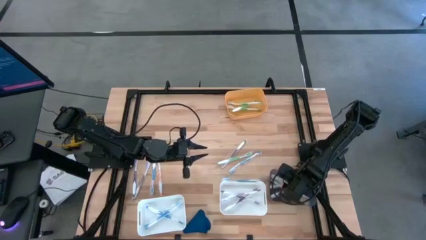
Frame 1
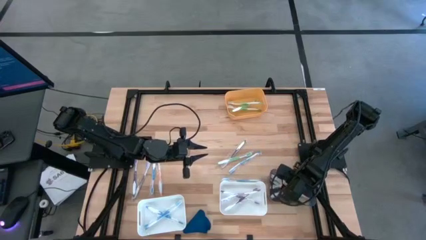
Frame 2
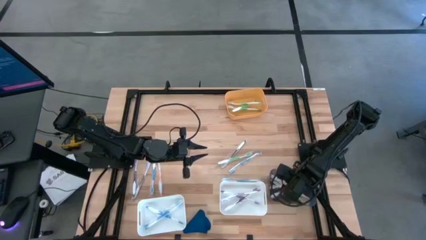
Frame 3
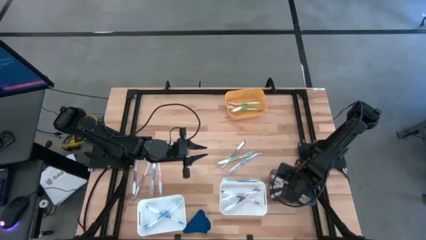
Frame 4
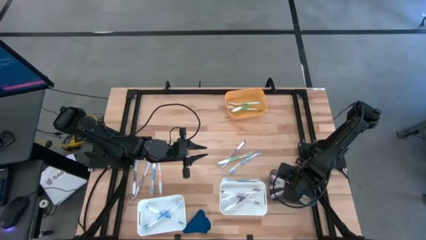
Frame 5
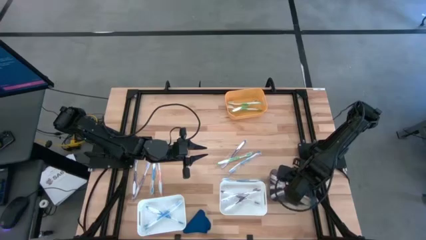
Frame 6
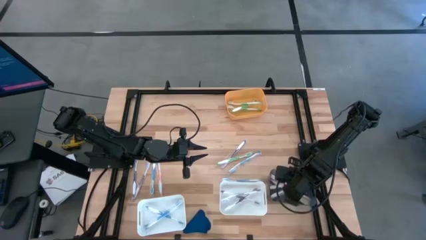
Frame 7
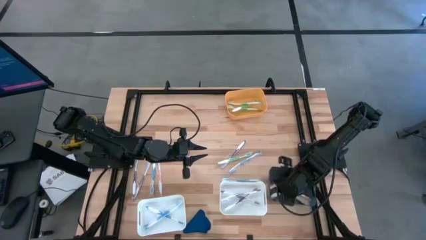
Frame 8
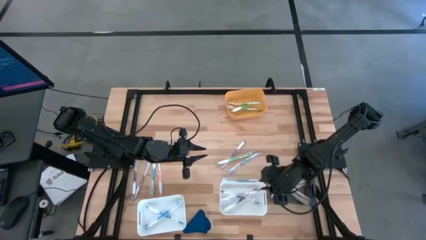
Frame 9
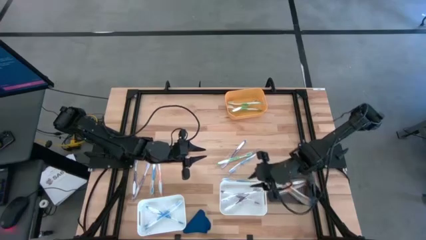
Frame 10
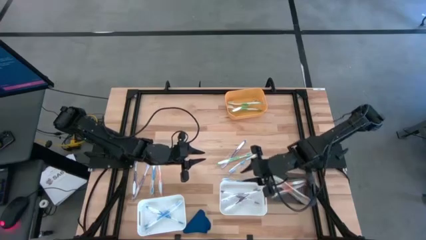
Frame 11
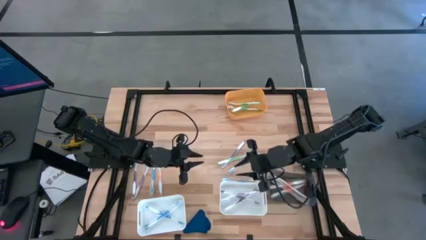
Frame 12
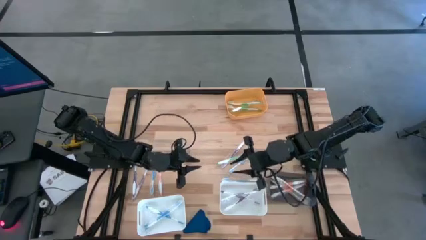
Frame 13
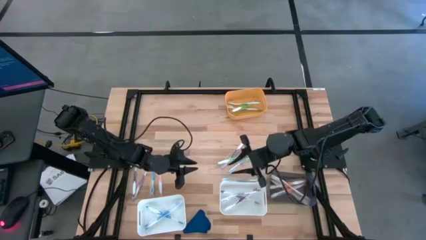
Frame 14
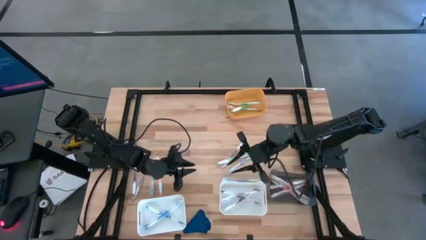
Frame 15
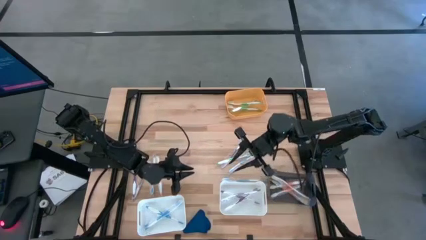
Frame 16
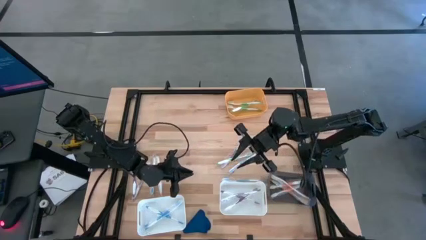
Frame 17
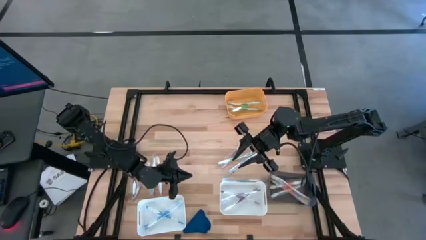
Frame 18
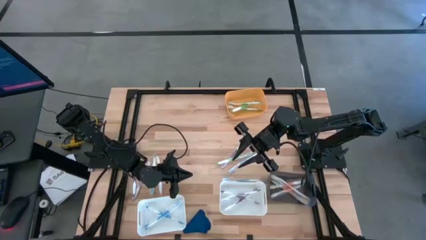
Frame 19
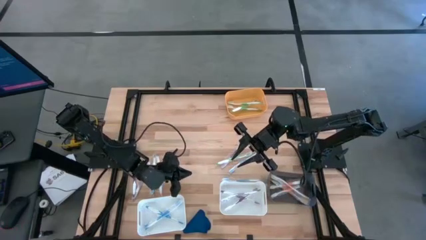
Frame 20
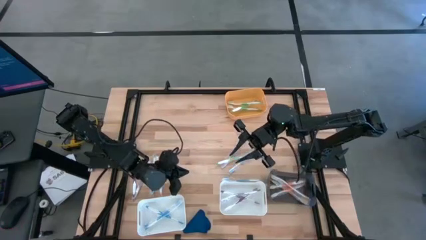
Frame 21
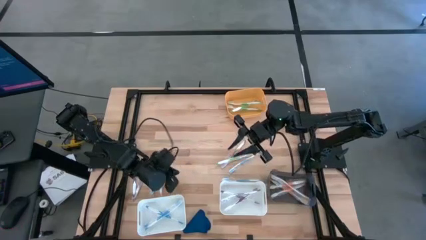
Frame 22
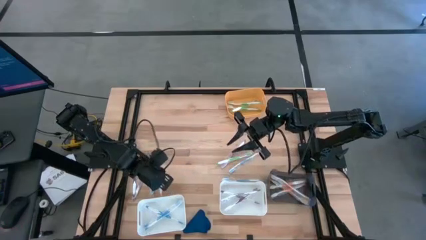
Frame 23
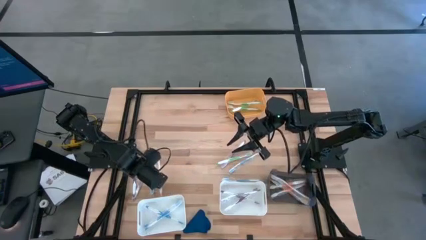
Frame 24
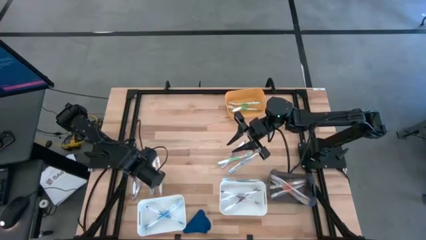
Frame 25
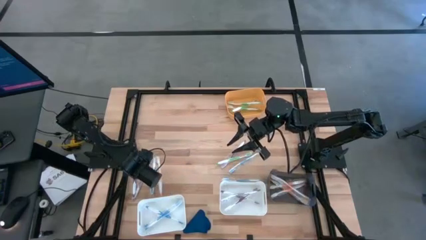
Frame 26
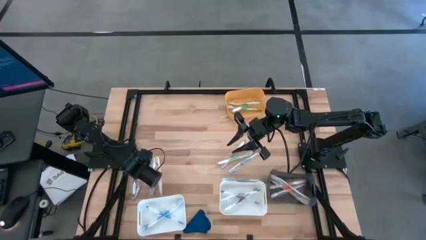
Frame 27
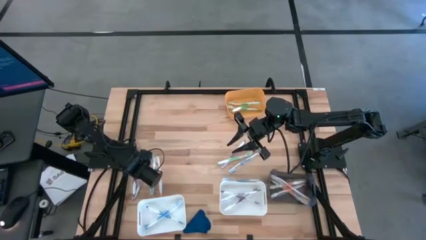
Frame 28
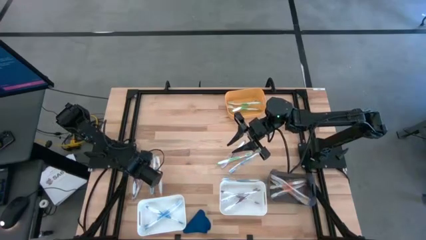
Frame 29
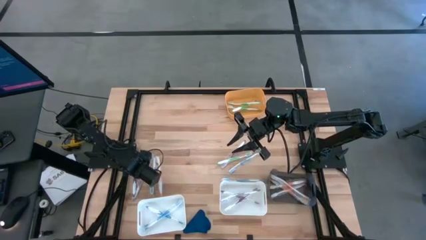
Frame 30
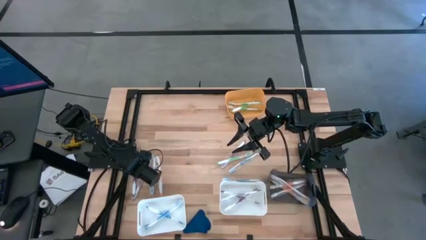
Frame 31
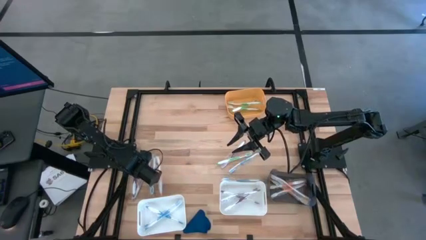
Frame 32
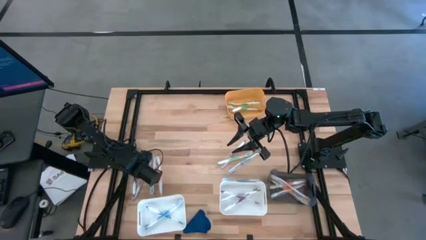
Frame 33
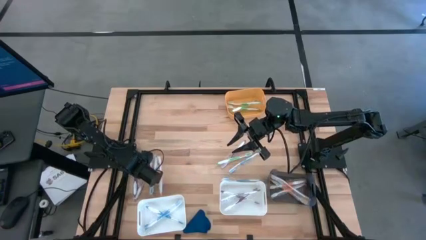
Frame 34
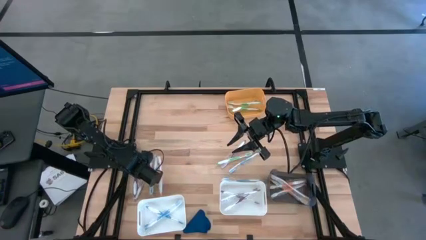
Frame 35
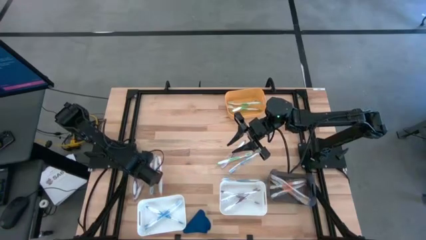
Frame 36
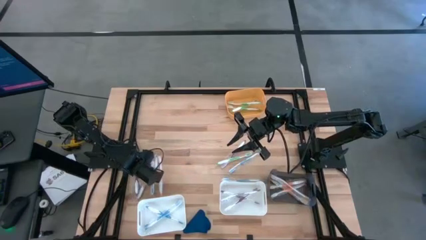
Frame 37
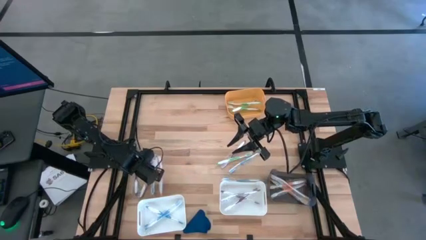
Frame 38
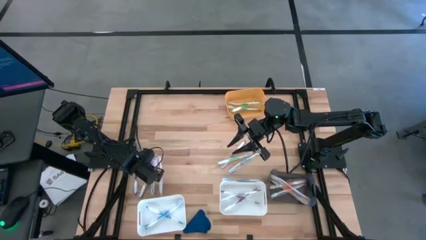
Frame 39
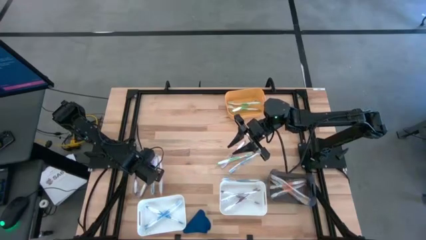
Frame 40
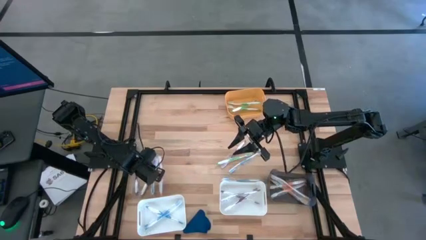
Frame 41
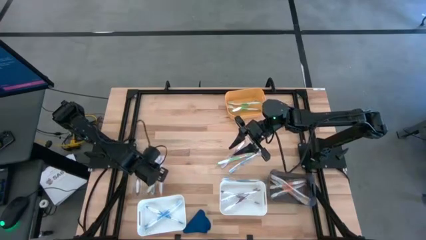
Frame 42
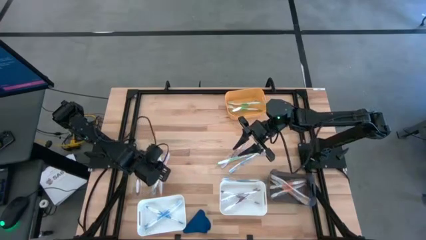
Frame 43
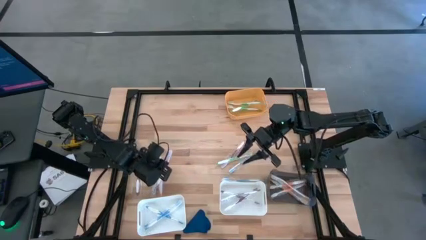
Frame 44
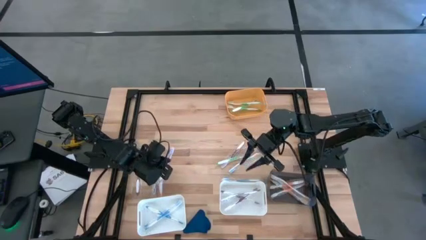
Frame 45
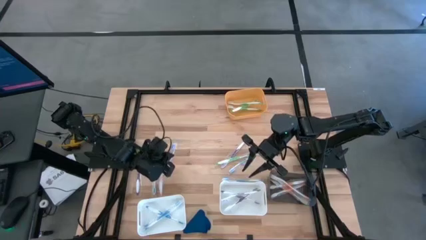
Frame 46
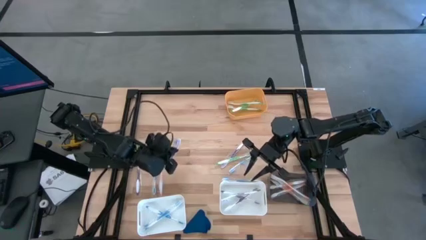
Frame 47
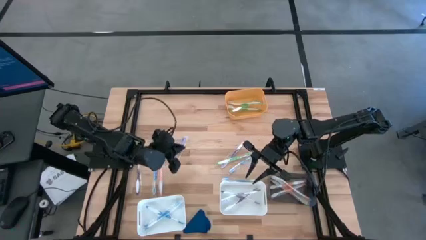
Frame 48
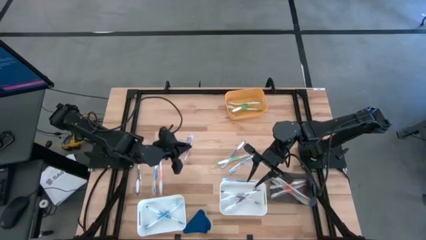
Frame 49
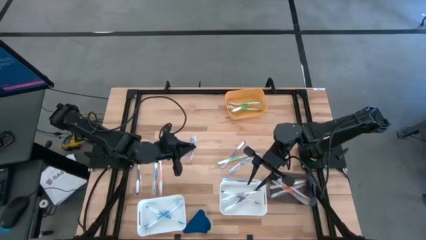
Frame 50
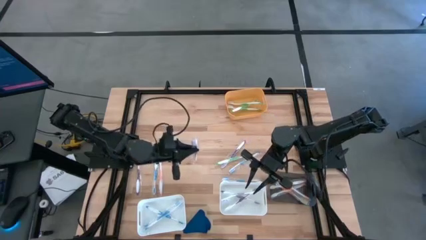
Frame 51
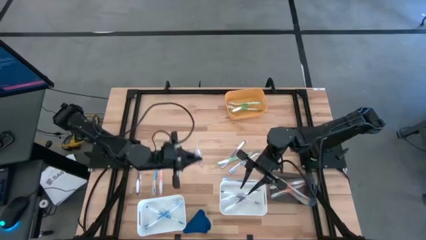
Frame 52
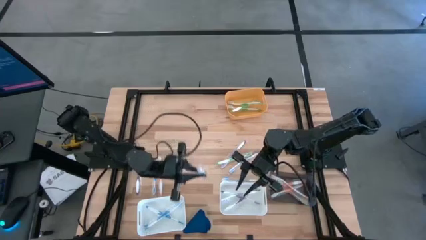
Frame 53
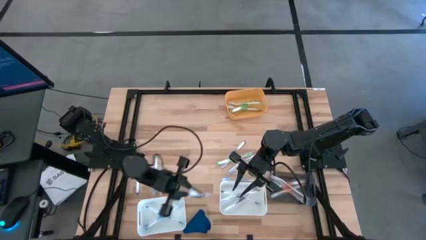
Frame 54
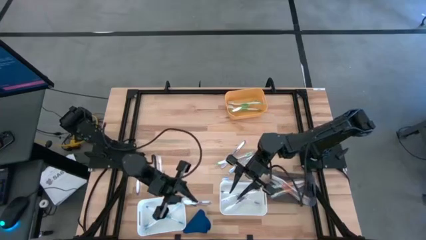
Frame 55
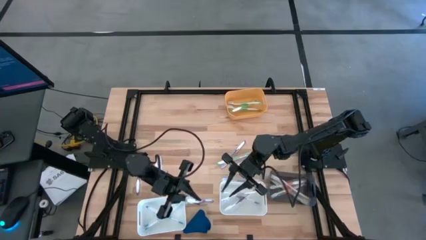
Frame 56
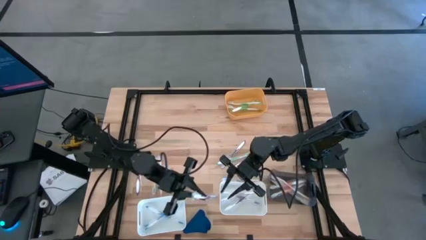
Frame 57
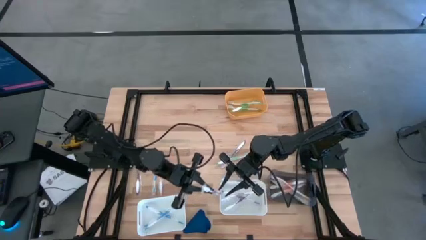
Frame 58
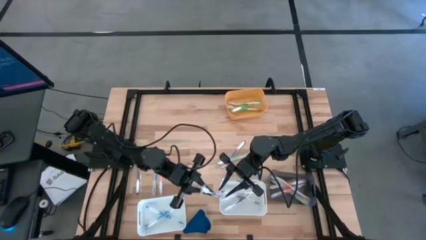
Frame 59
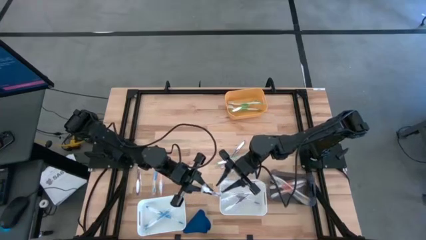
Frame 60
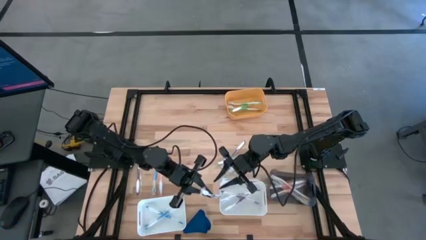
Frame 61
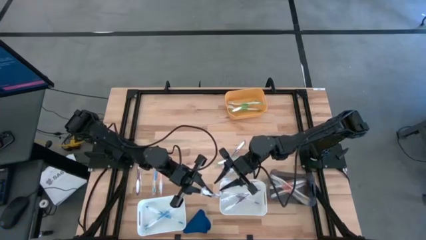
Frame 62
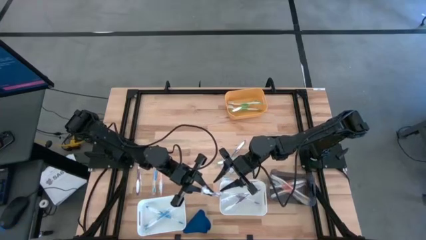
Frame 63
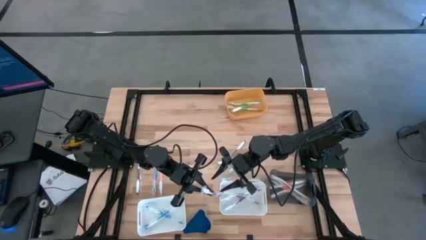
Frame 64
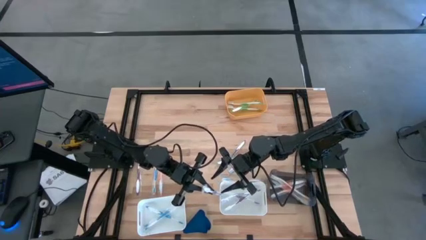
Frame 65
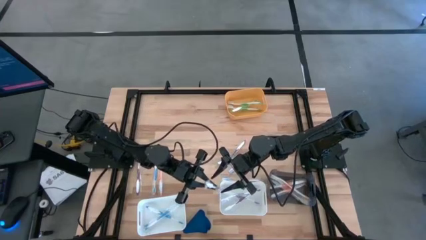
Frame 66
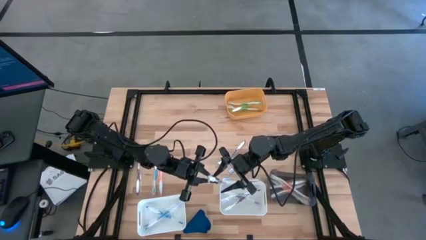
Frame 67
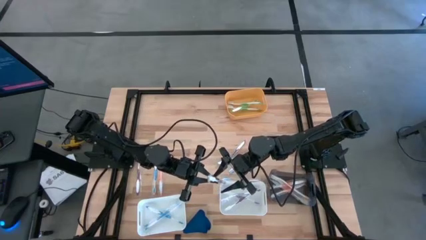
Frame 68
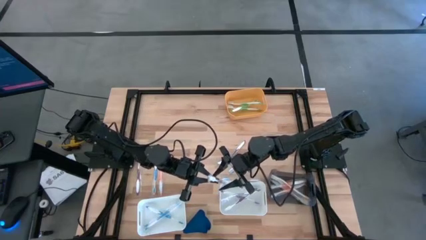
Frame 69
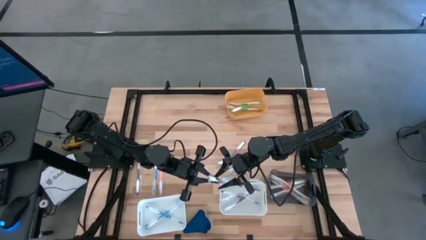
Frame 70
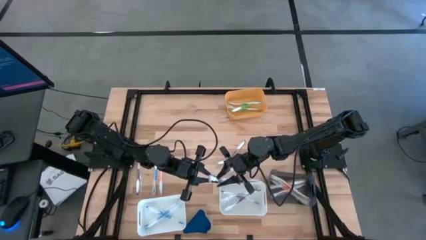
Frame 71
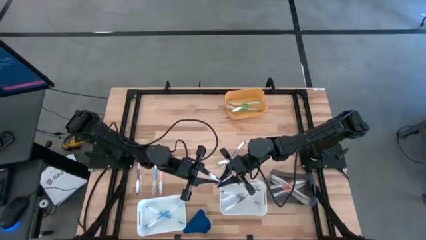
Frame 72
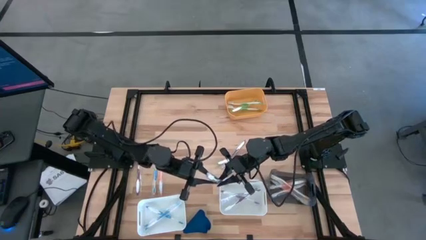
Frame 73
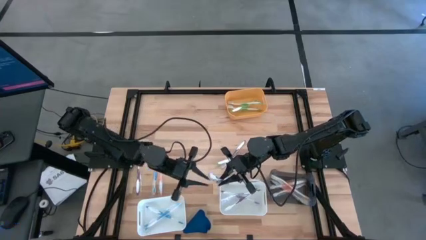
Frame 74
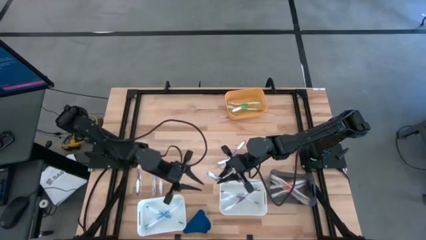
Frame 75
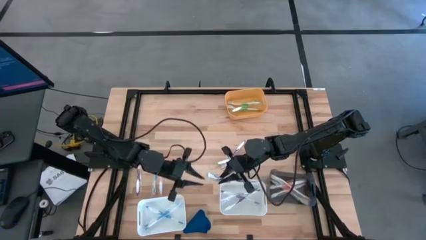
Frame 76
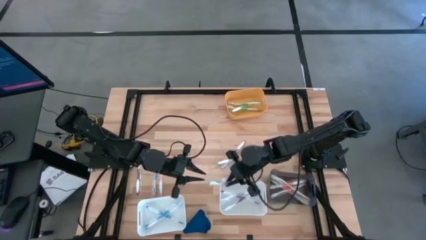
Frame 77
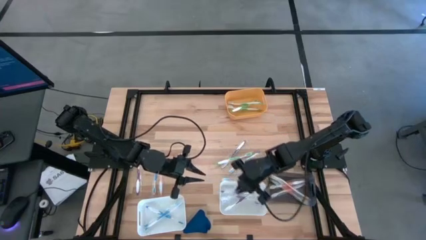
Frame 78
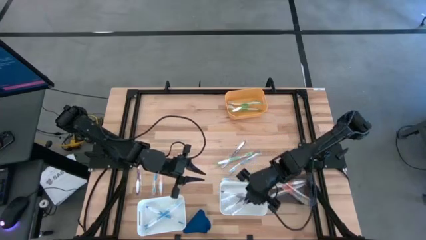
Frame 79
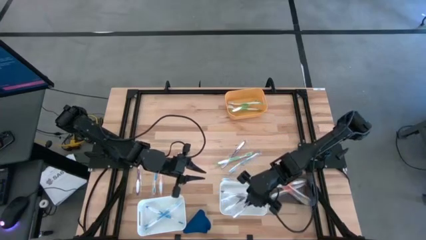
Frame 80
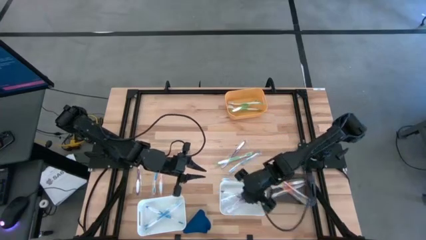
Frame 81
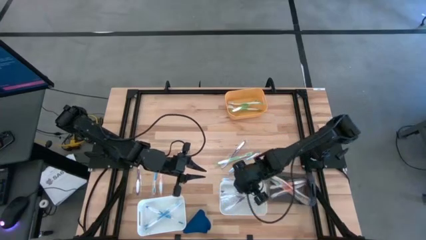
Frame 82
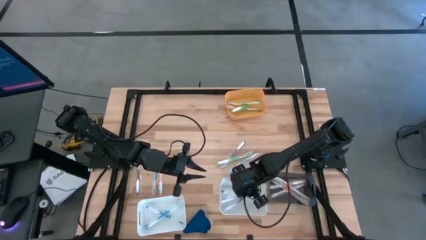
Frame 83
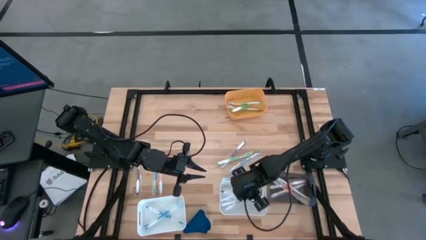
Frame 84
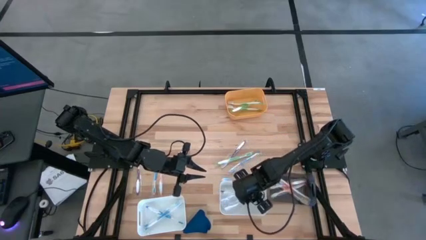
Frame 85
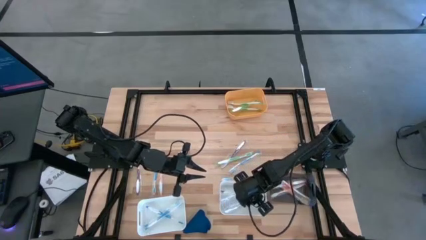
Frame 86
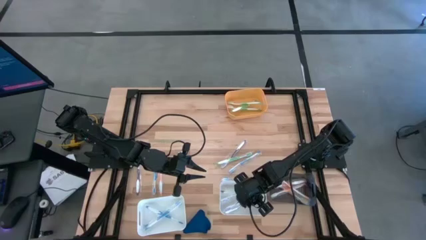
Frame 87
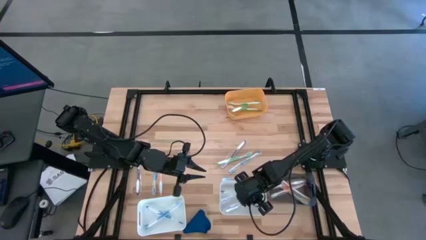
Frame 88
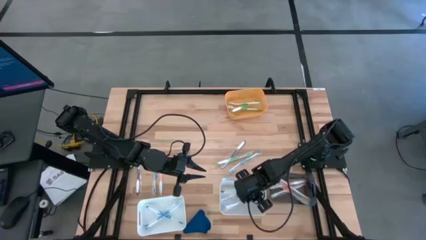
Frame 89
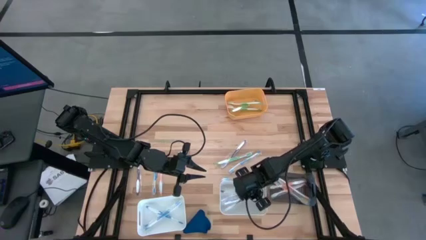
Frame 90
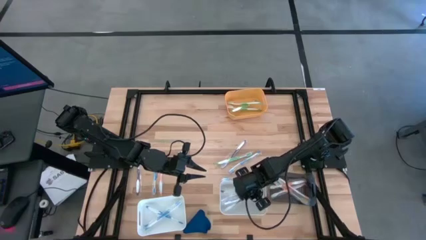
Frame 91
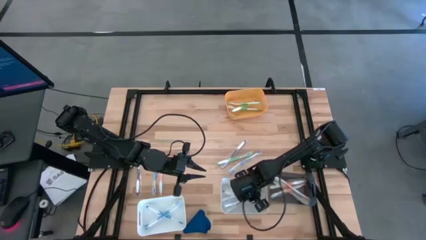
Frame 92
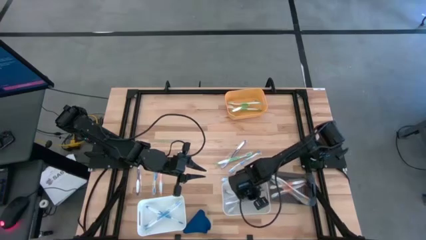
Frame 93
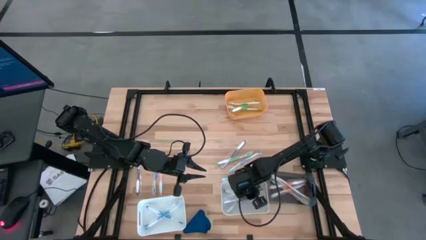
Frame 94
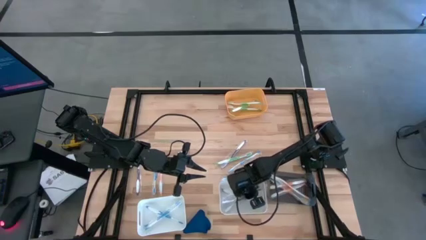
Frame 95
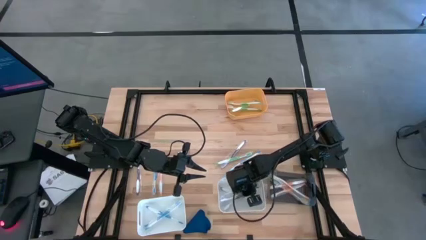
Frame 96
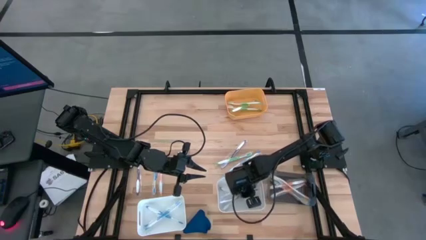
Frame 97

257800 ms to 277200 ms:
Task: Pick & Place Toothbrushes
Put the violet toothbrush into the right white bin
